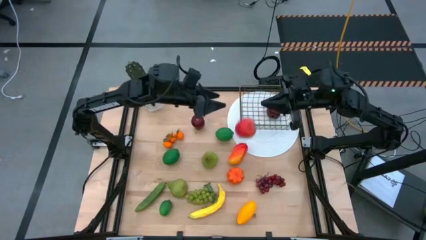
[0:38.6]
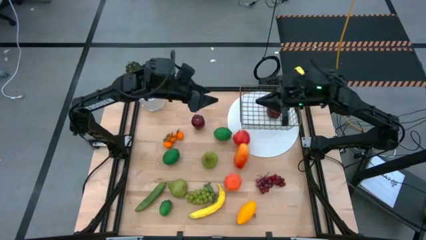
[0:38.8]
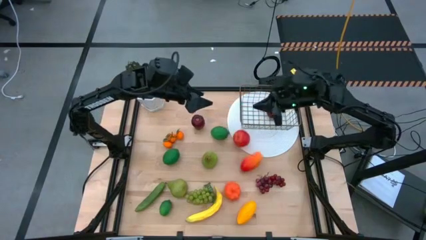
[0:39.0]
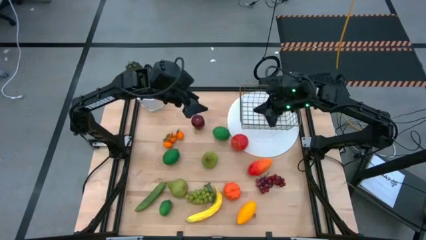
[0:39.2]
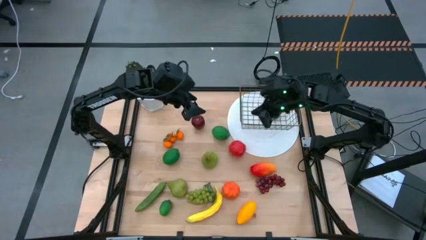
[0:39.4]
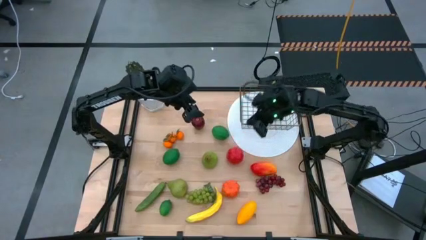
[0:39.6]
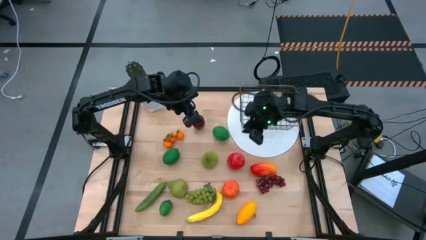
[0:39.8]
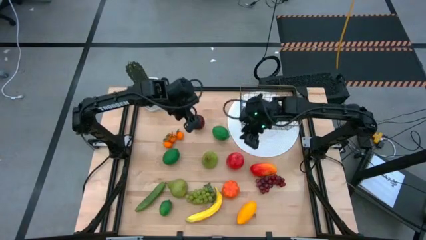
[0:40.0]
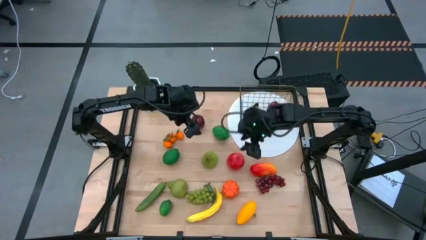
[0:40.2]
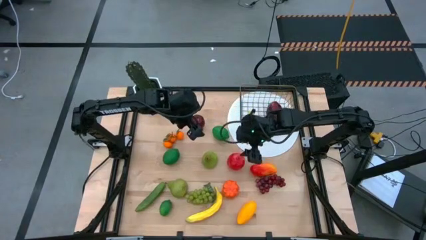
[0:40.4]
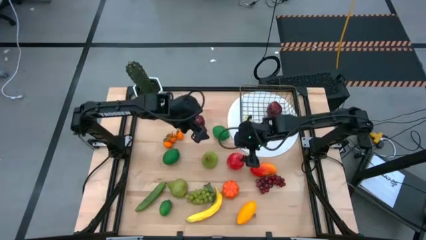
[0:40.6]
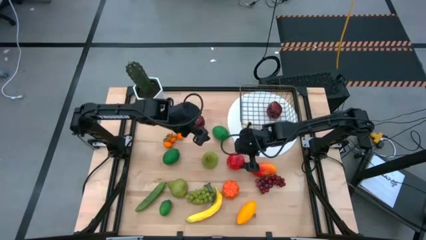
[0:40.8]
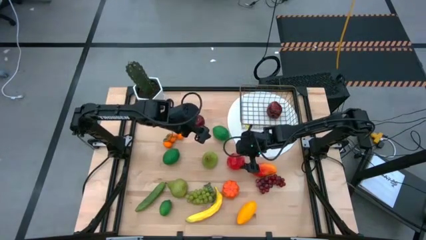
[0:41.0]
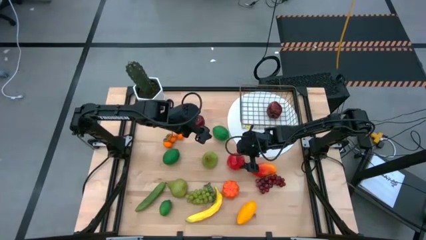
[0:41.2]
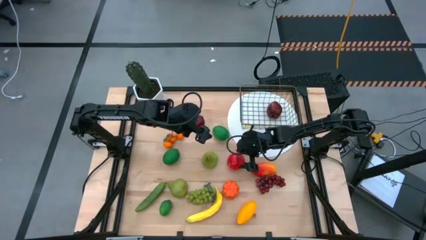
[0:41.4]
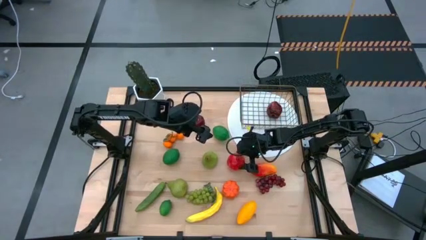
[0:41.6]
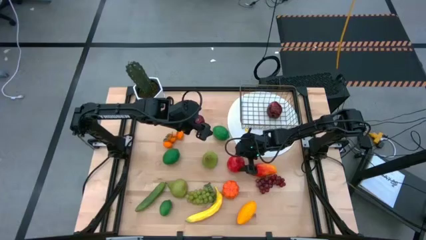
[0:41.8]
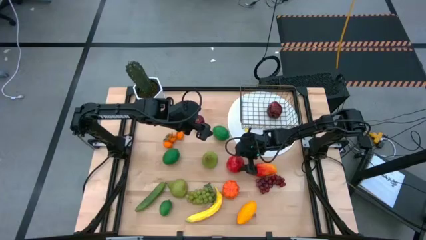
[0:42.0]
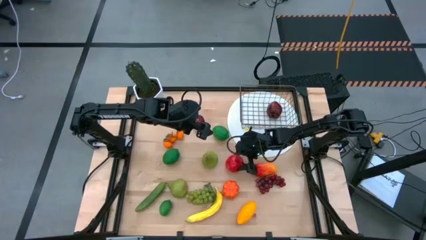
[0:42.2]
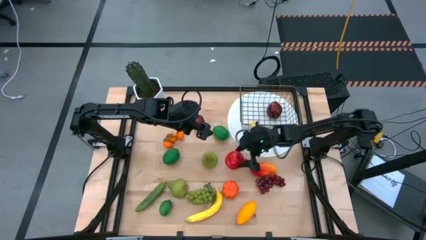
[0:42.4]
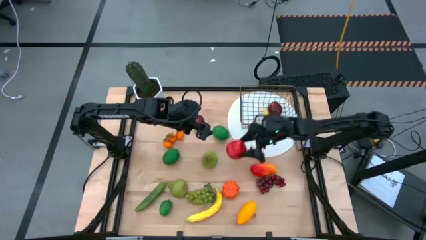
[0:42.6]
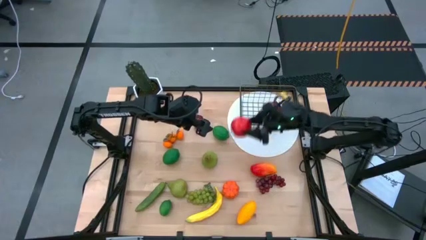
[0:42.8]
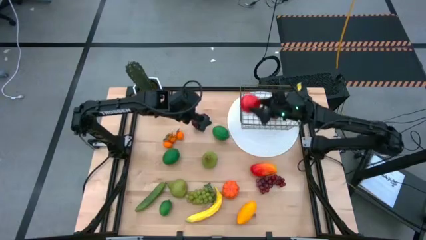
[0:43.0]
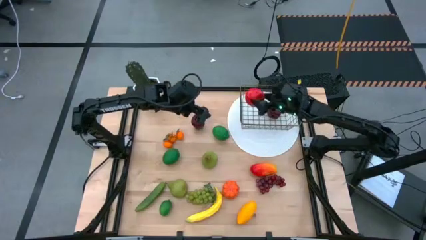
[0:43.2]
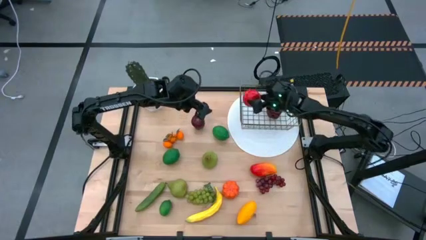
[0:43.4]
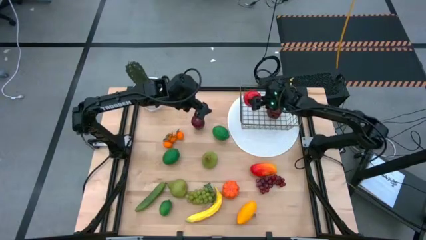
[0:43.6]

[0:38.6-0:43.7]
Task: Build produce basket
Put the red apple into the gold wire basket

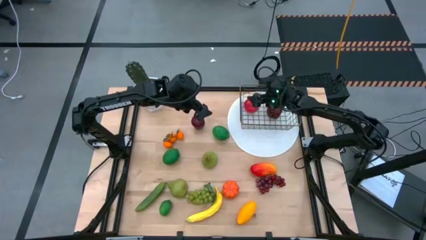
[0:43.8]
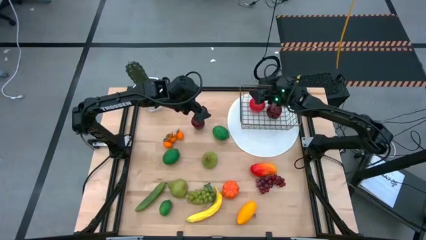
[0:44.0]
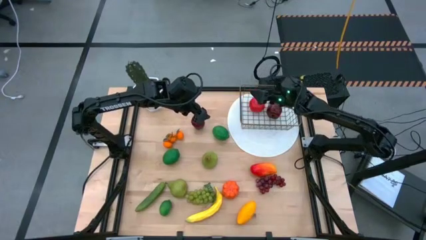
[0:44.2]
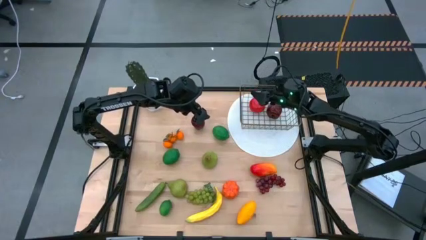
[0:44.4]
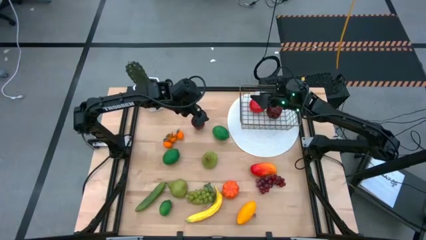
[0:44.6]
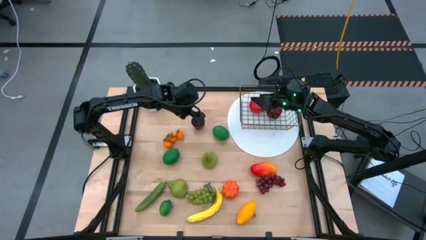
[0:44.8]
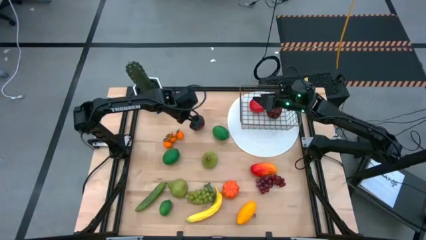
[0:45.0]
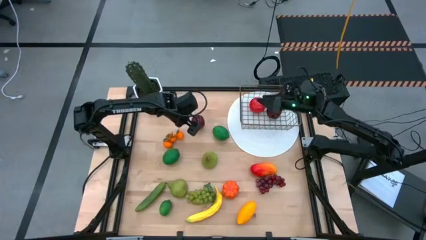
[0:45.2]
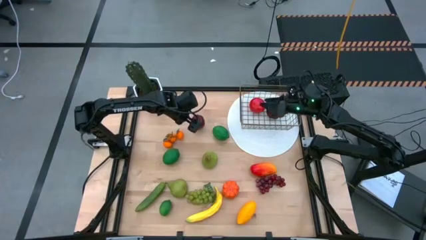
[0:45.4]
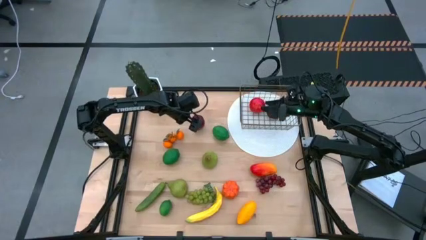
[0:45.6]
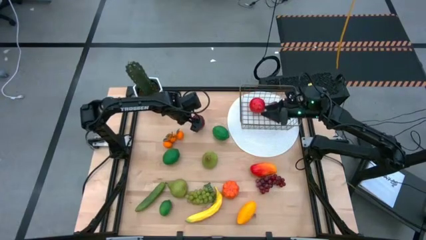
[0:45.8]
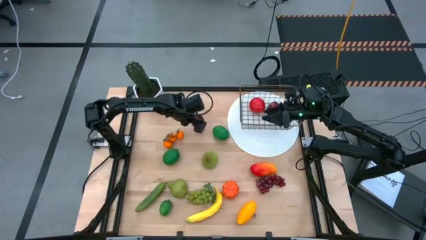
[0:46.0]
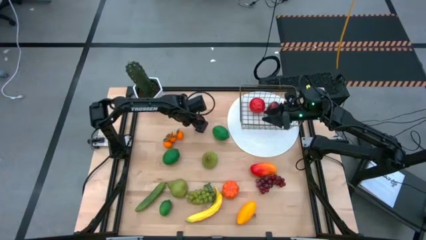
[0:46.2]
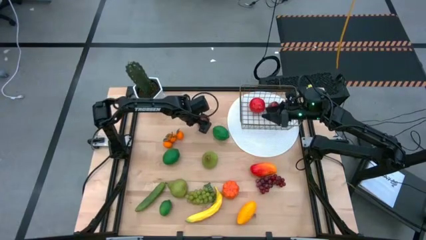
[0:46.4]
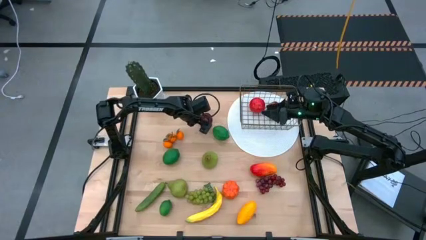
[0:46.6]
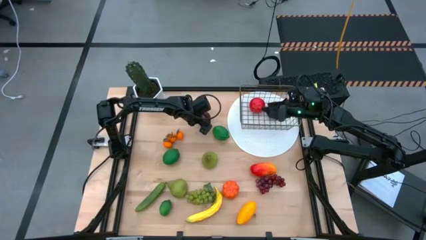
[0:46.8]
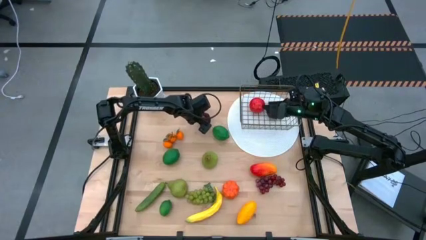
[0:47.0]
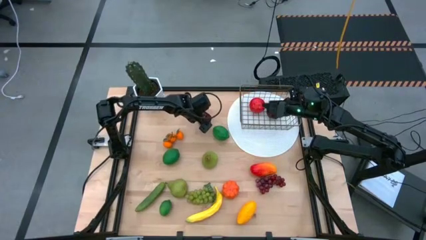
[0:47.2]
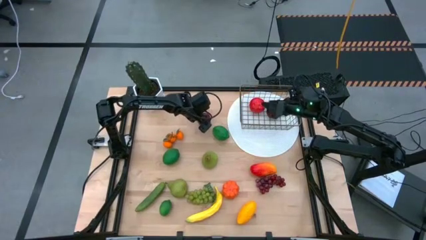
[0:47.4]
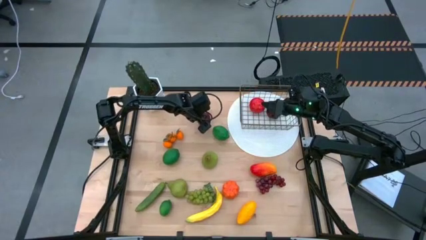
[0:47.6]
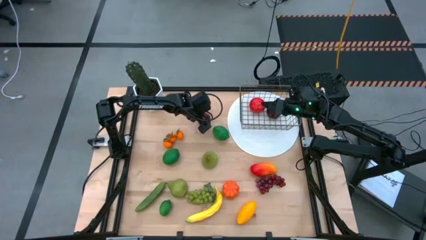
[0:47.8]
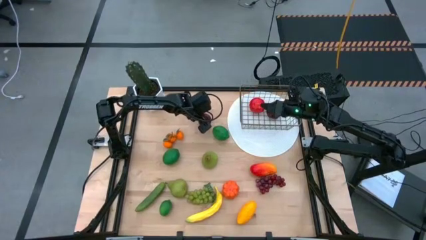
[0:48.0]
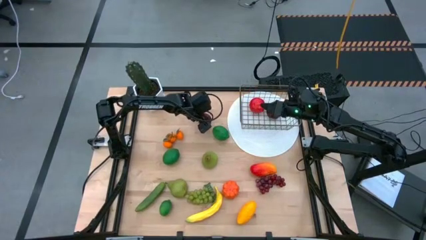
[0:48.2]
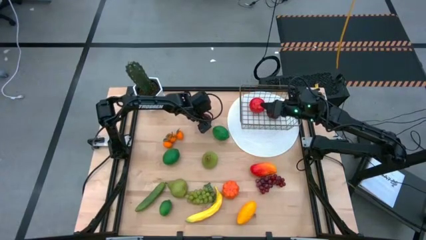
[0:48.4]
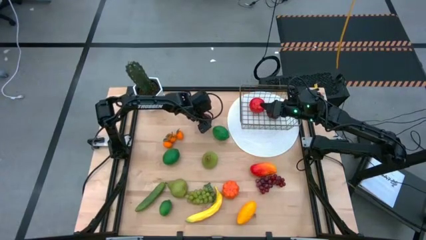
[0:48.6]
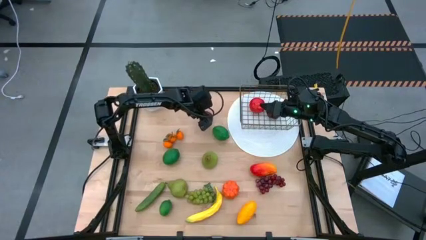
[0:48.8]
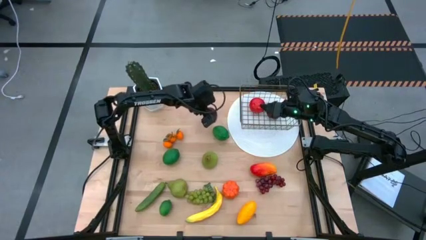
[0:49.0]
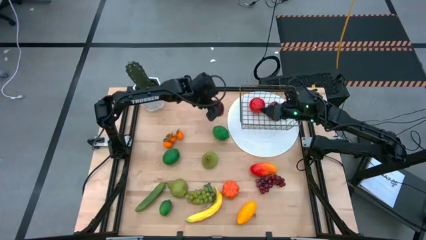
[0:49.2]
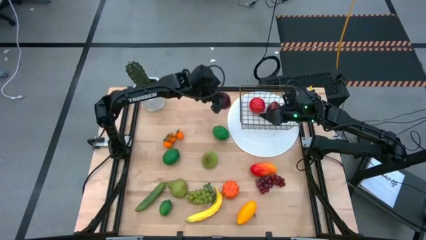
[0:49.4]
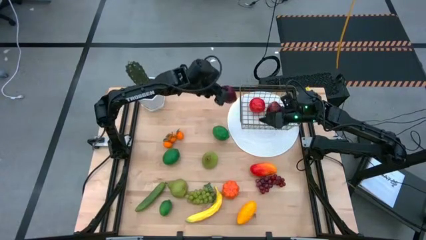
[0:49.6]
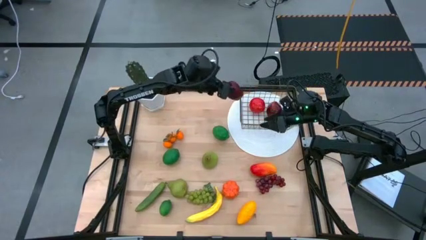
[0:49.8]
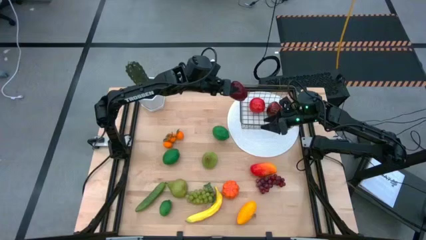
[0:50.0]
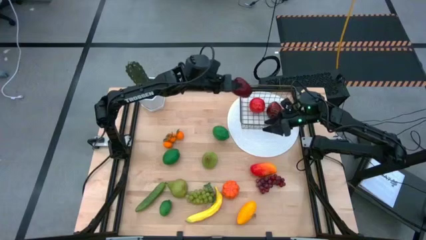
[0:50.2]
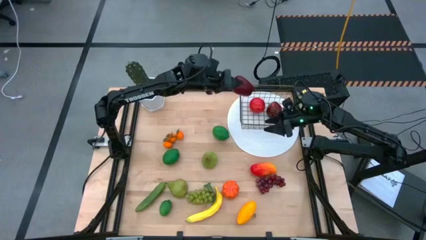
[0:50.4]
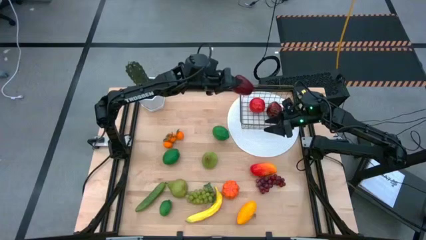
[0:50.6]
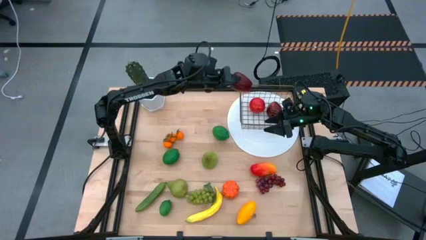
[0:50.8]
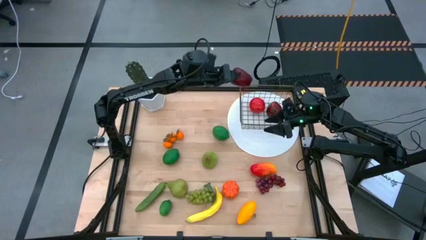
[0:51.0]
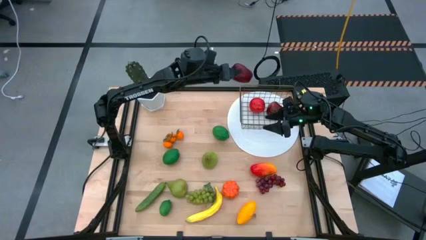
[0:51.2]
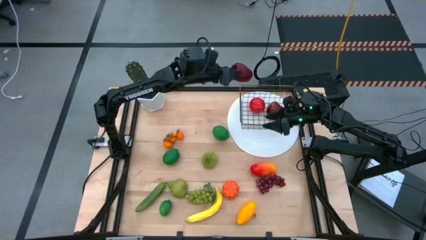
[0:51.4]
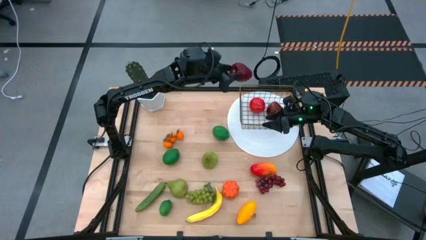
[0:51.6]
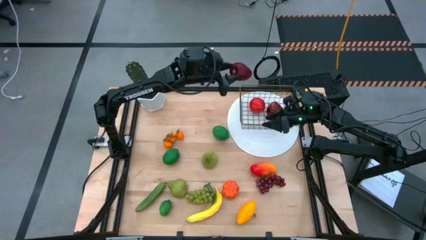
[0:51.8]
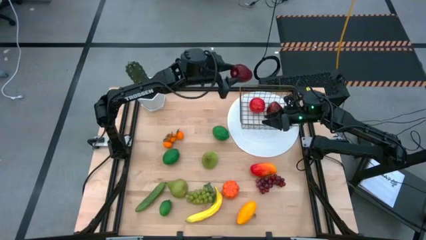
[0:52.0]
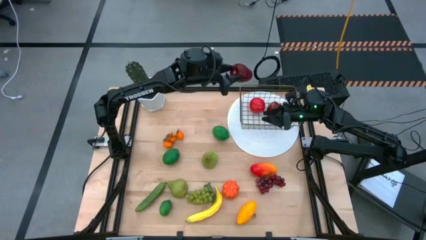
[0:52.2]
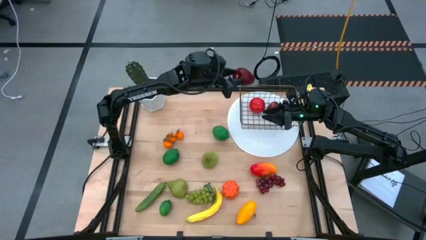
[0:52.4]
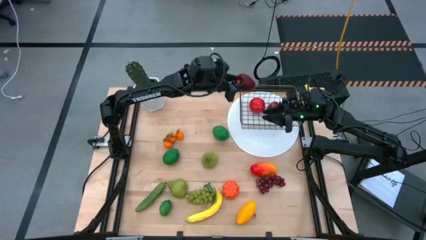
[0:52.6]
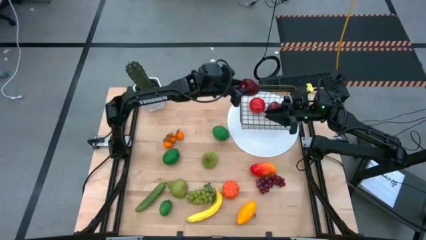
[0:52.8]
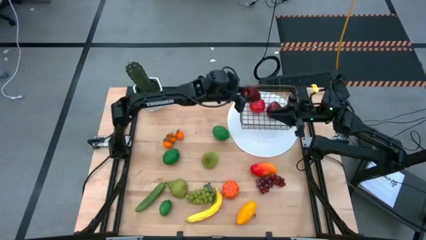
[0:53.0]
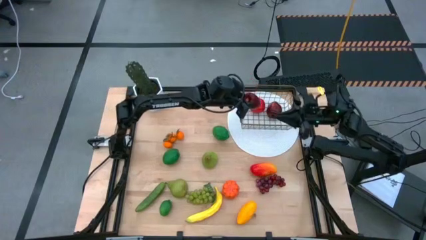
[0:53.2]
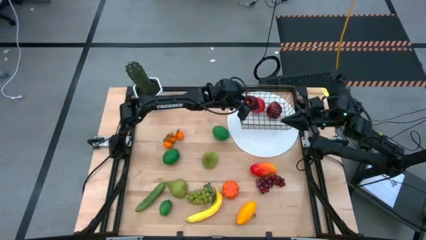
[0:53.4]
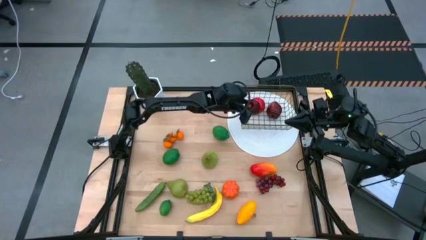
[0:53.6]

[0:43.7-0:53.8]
Put the dark red apple into the gold wire basket
